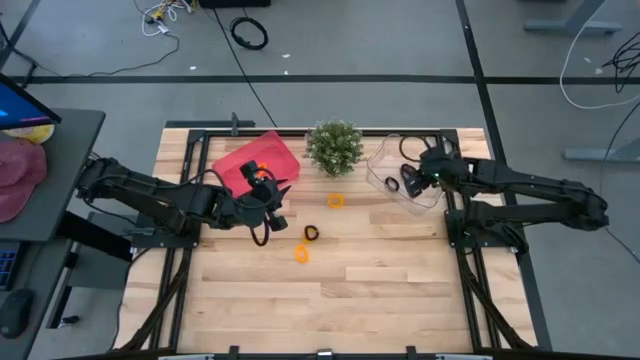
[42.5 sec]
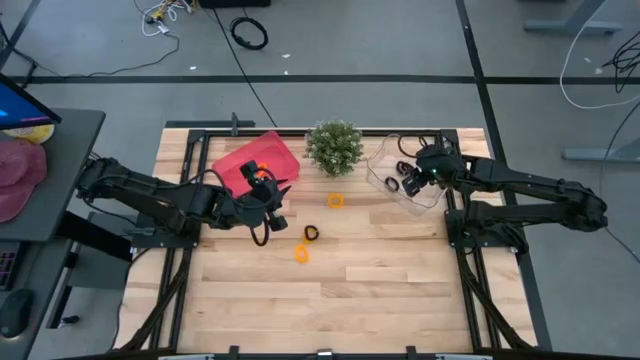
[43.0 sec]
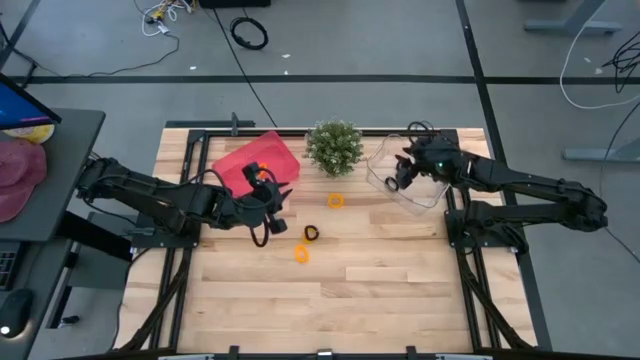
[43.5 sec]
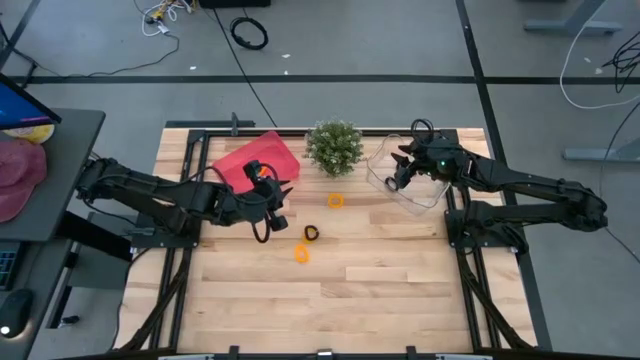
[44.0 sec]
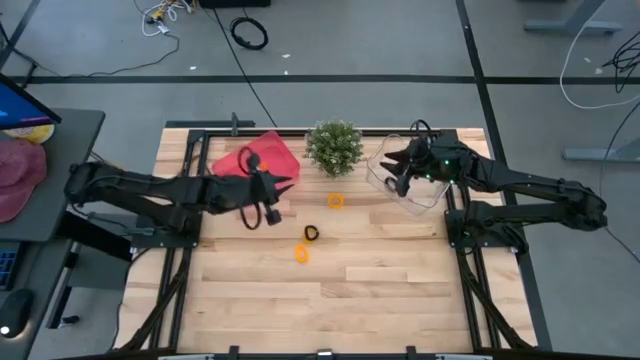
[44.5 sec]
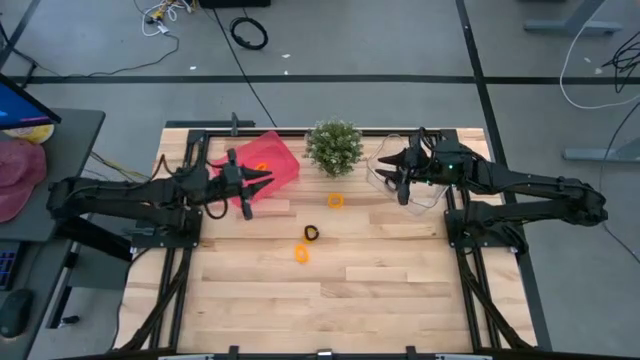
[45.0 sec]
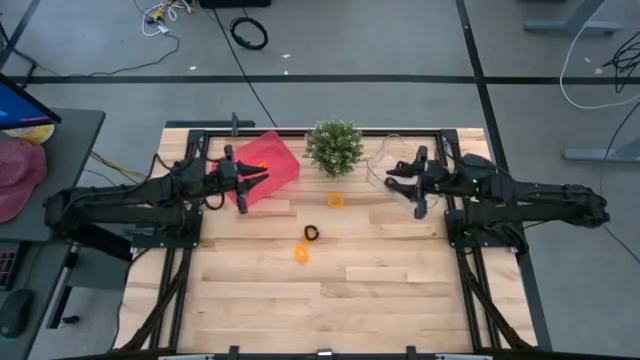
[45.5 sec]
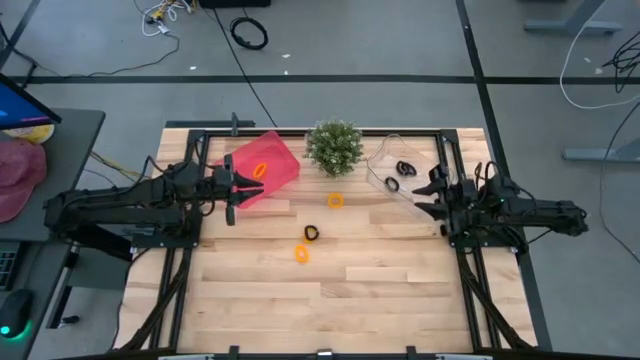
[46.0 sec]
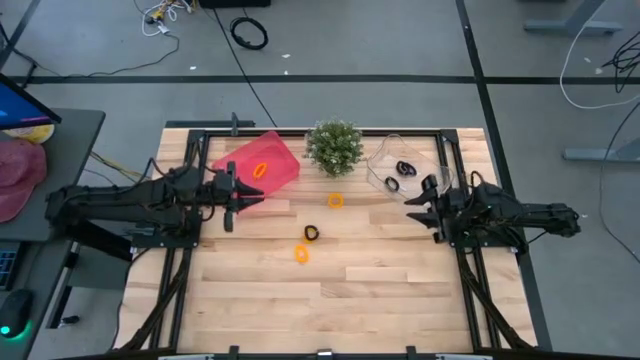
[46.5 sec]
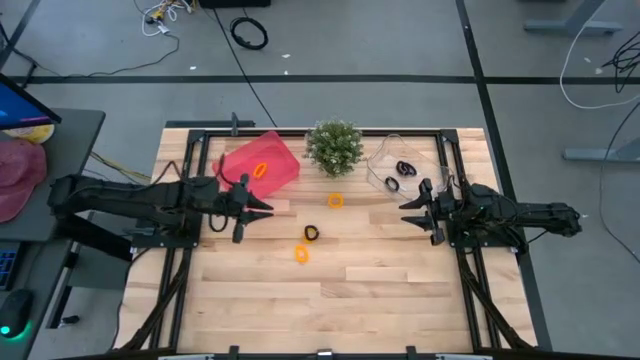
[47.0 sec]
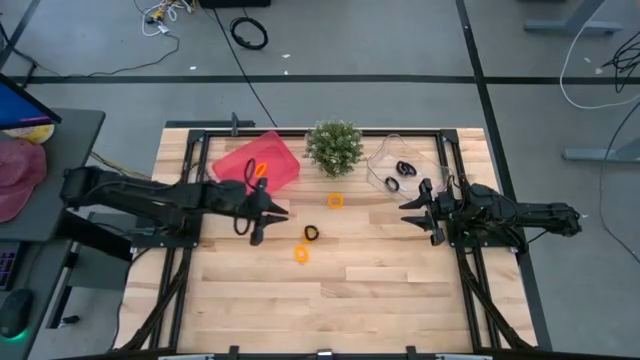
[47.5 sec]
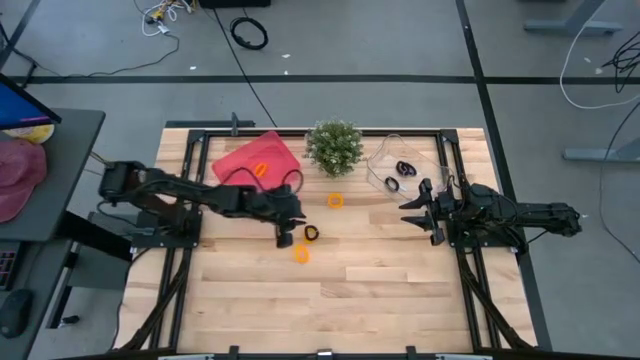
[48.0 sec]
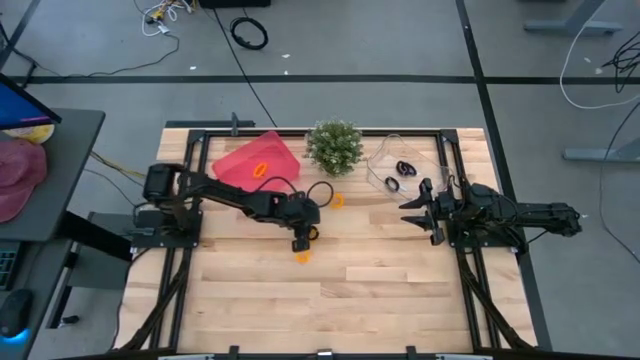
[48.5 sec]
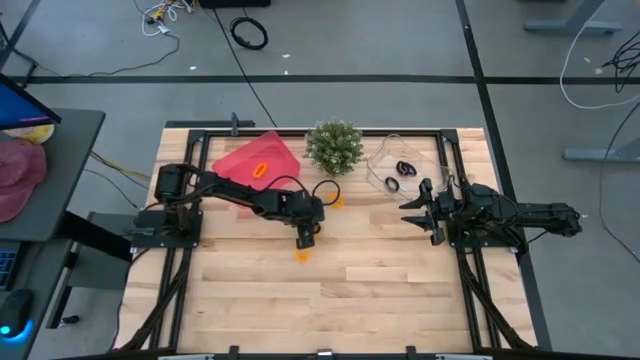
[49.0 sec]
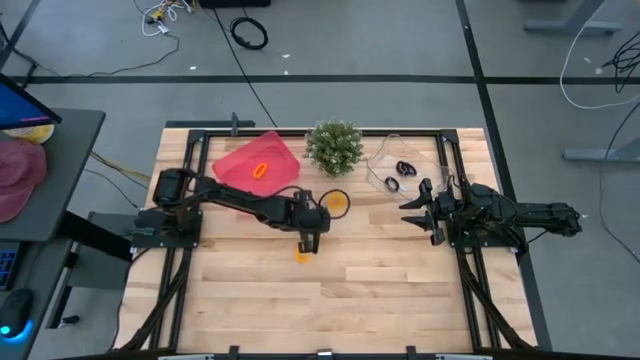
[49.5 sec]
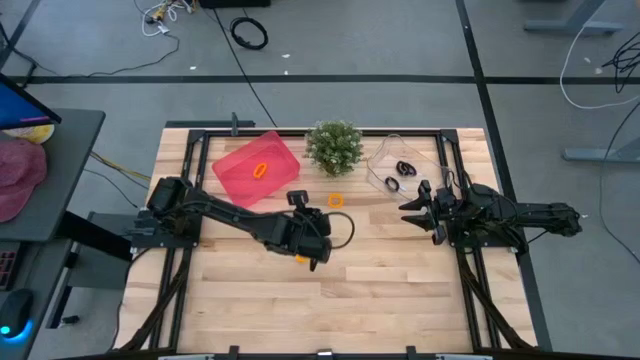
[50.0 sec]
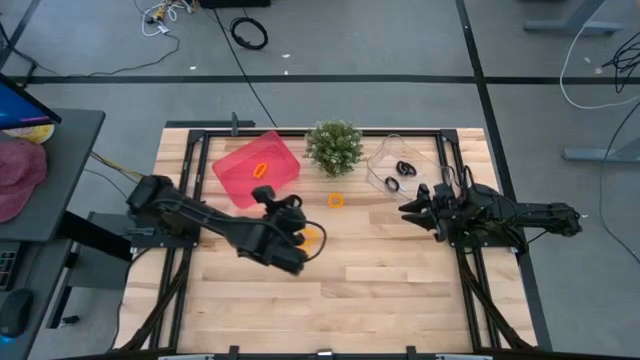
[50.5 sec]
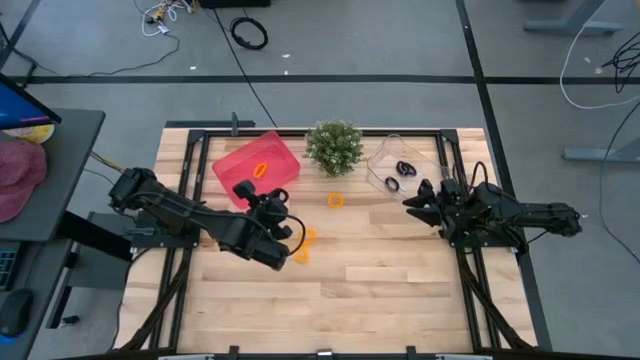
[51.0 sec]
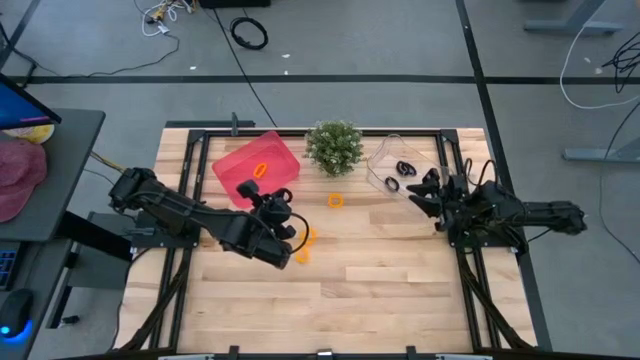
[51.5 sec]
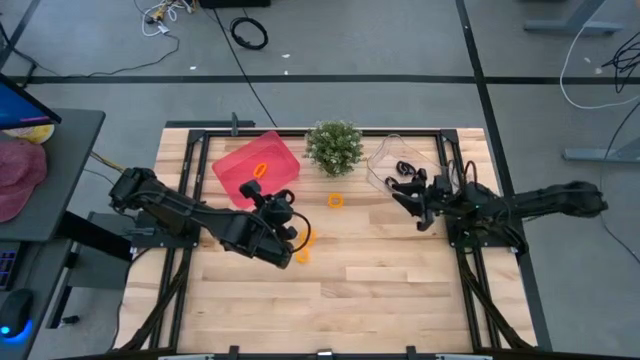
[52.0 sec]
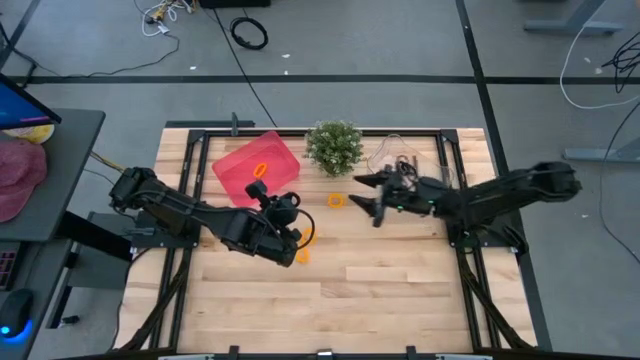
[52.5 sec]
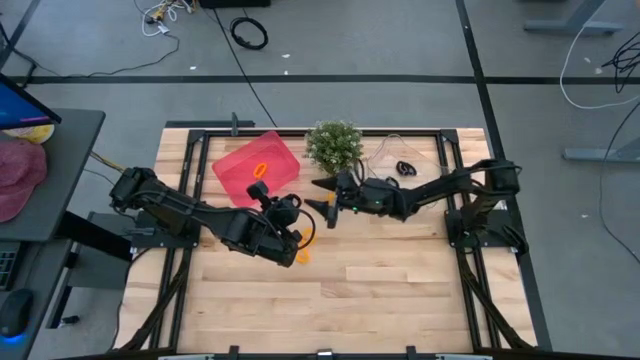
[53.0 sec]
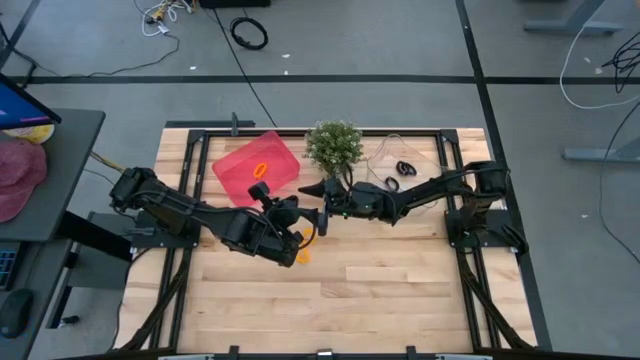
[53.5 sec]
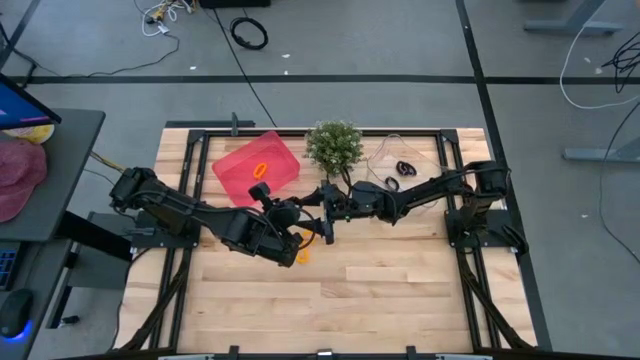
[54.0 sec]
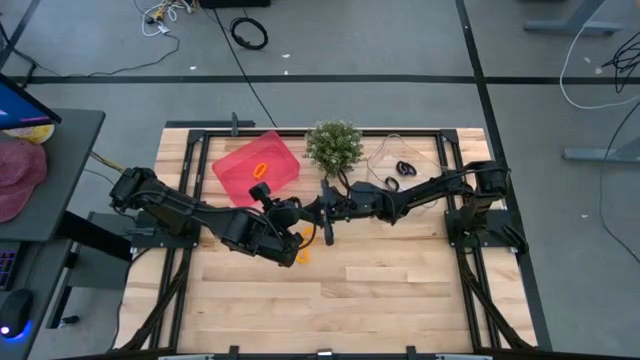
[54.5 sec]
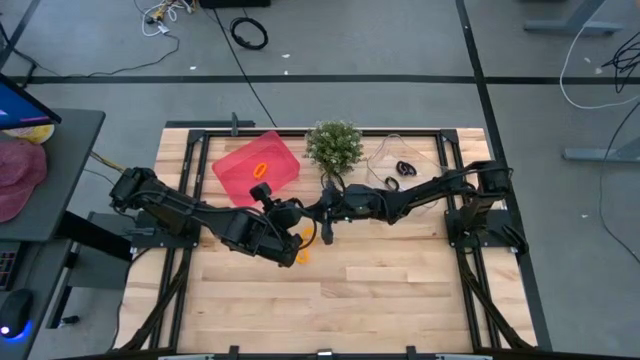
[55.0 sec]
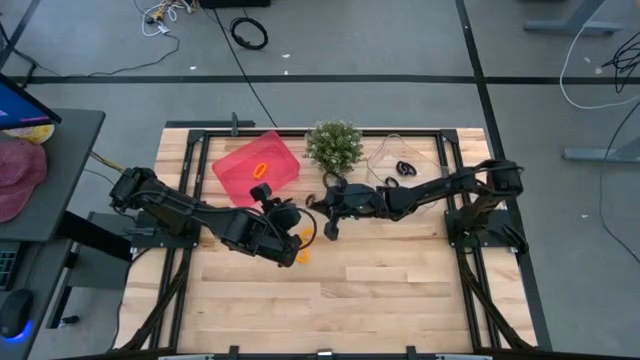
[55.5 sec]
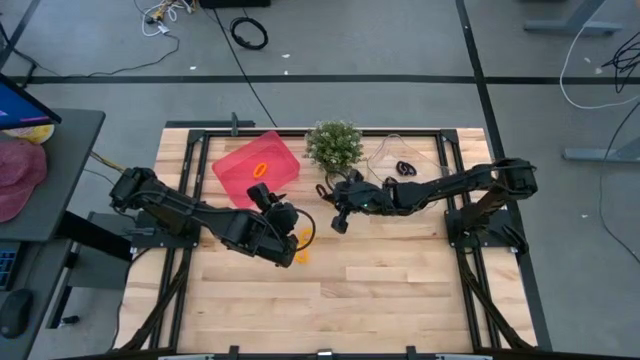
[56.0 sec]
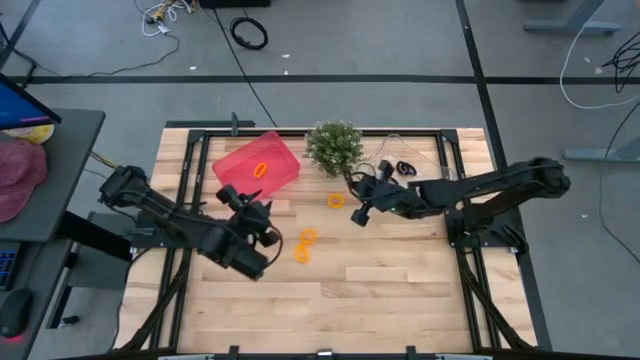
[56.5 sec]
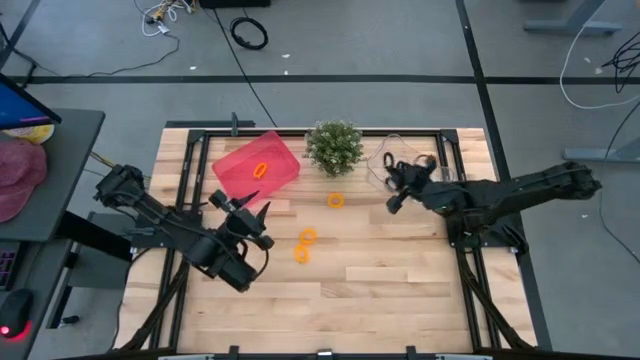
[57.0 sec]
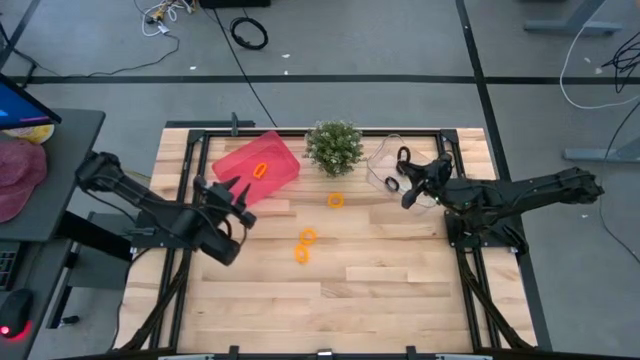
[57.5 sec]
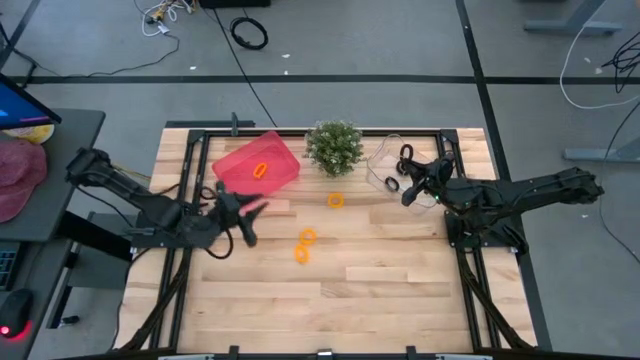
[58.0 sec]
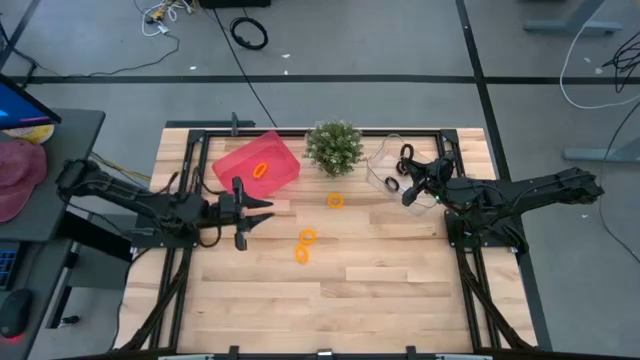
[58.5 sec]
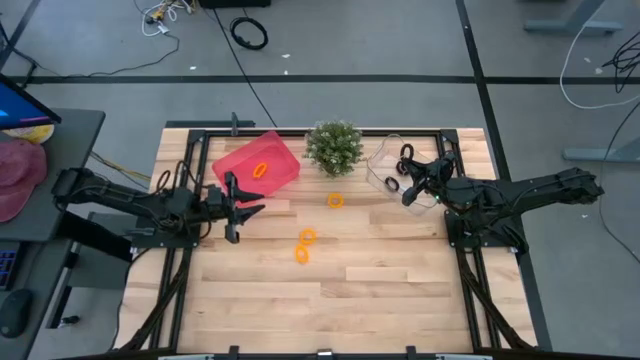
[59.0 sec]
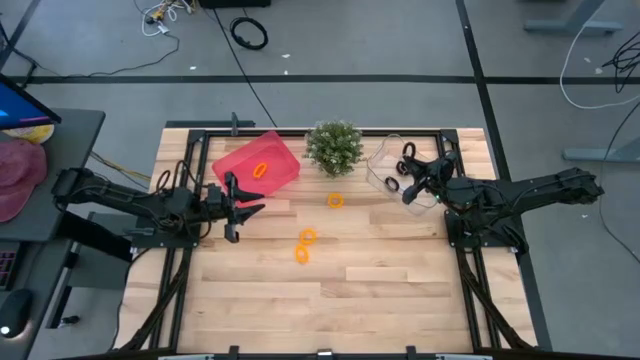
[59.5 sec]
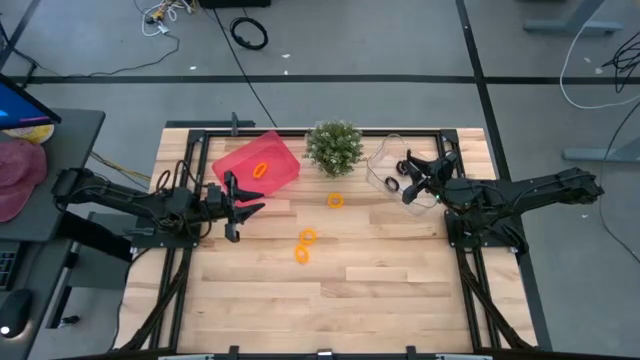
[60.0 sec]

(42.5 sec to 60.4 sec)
Task: Sort spring keychains
Put the black spring keychain into the transparent bin

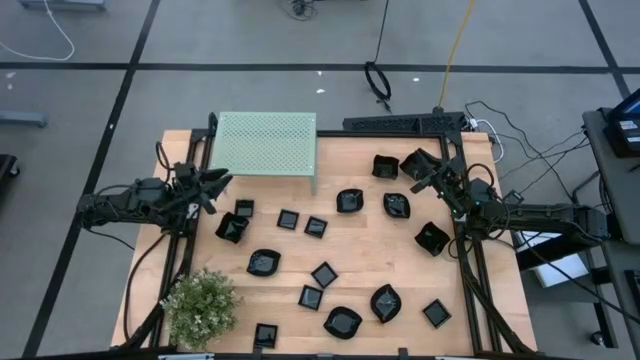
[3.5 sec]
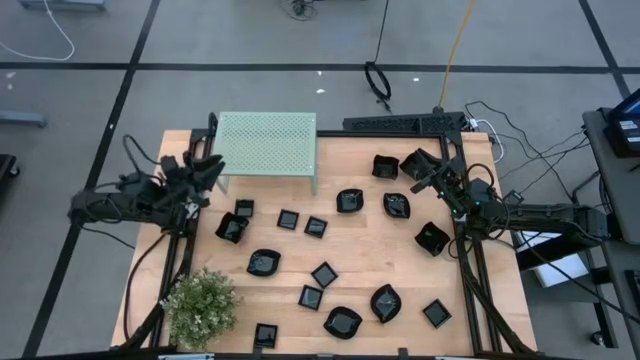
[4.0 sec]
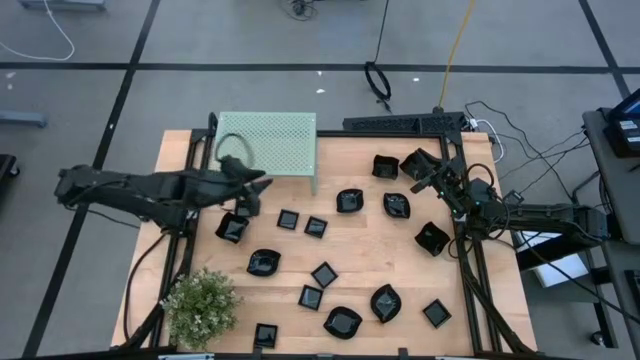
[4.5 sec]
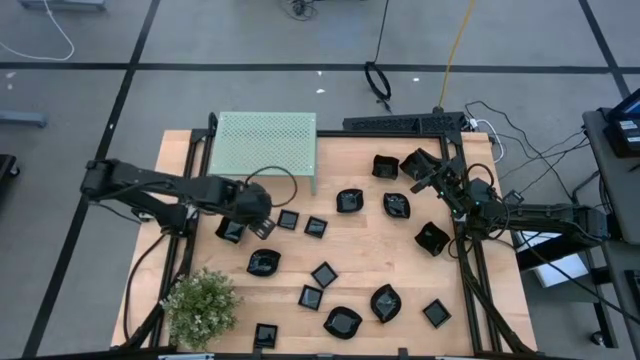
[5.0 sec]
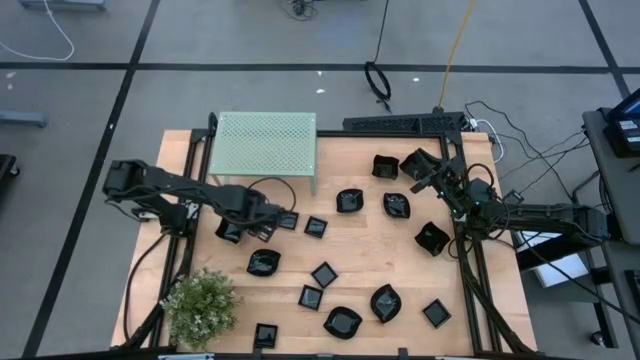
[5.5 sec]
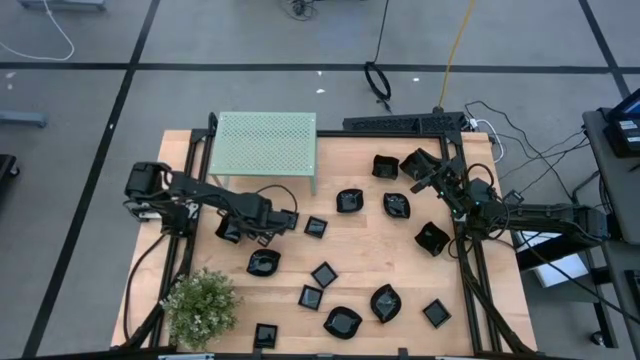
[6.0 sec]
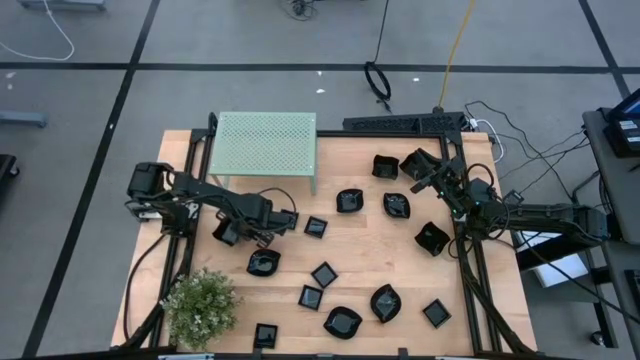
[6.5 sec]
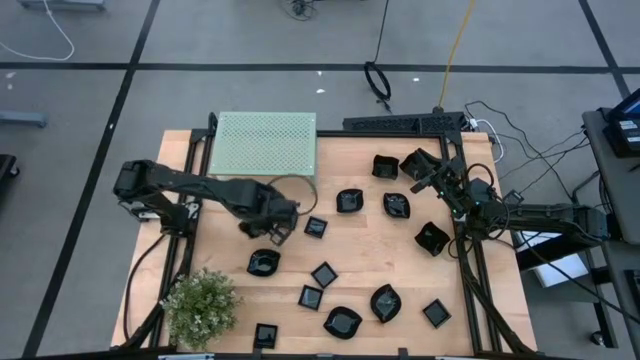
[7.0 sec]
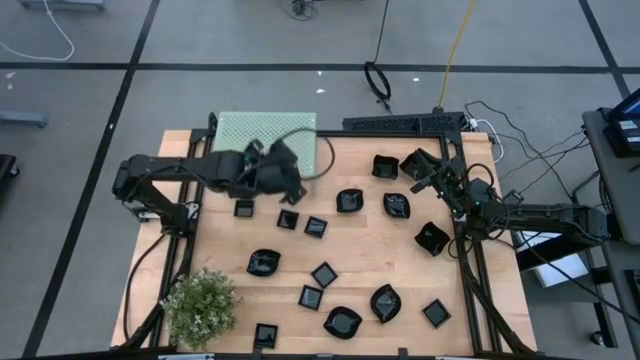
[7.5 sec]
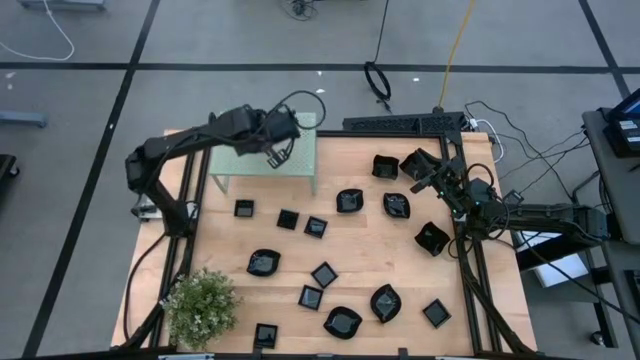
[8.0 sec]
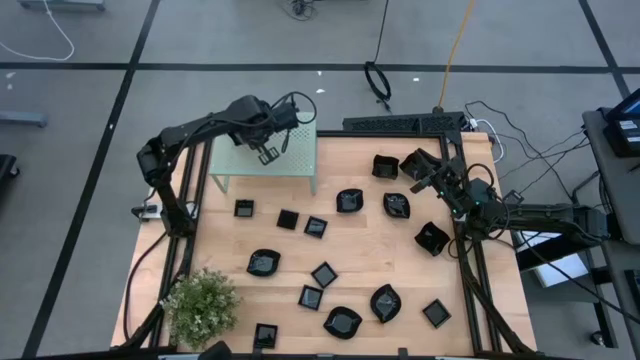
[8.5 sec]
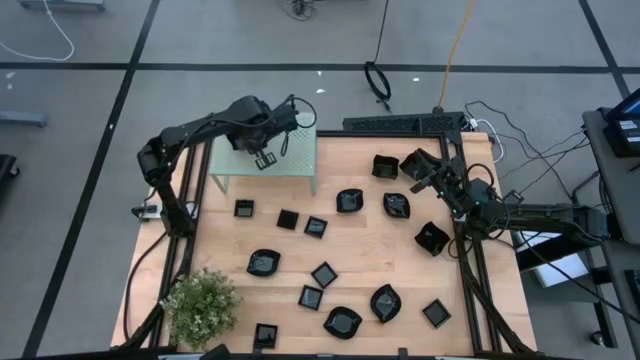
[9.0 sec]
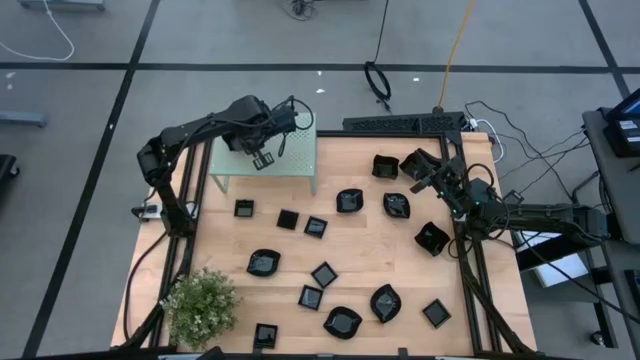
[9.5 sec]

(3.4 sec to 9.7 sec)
Task: Pick & Place Mini shaped plates
Put the left distorted square plate on the shelf
